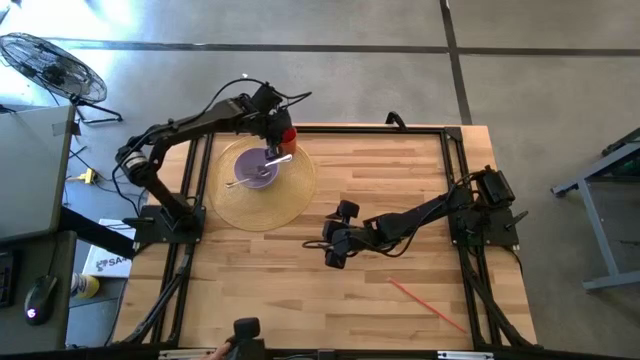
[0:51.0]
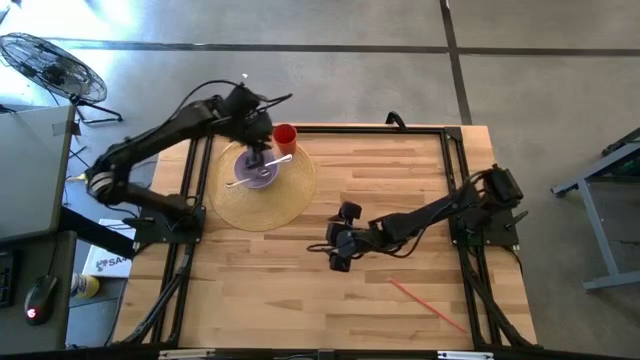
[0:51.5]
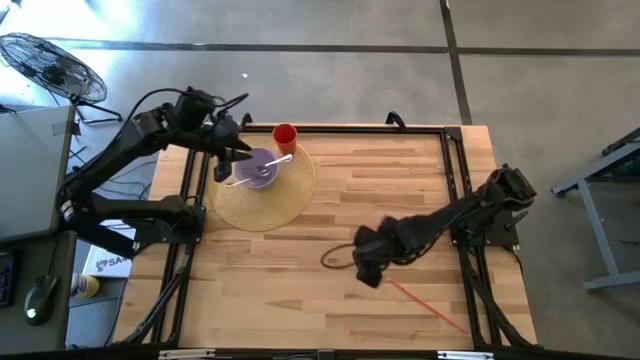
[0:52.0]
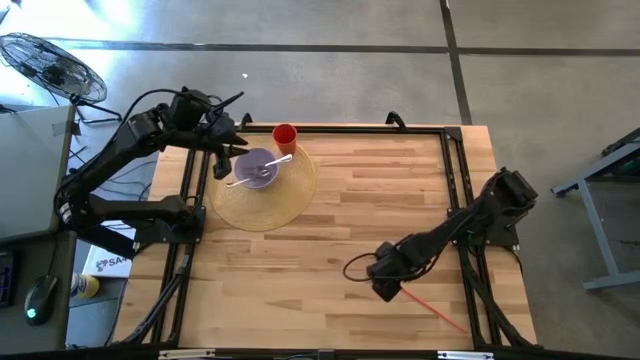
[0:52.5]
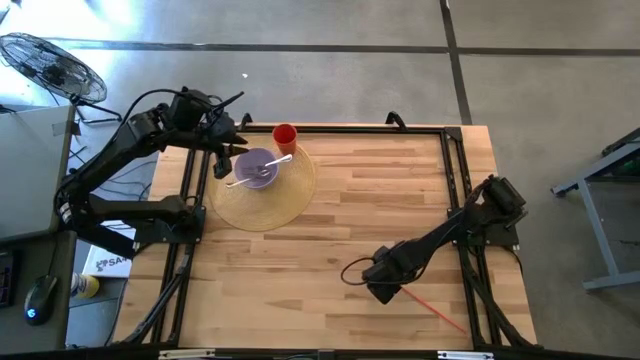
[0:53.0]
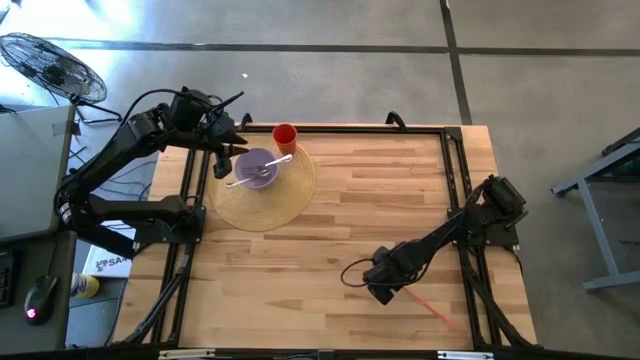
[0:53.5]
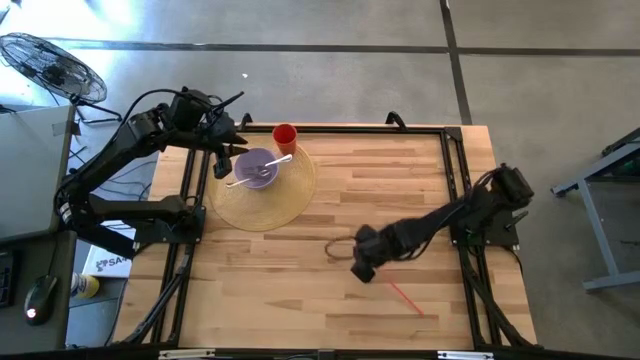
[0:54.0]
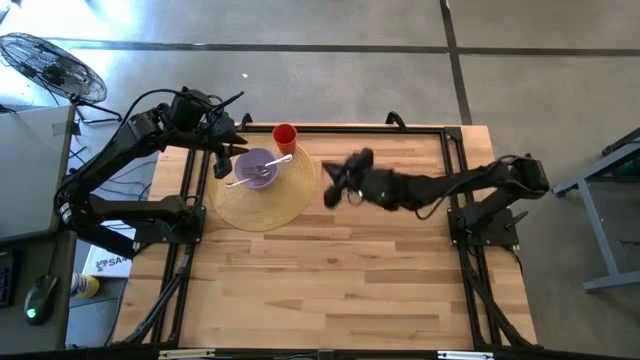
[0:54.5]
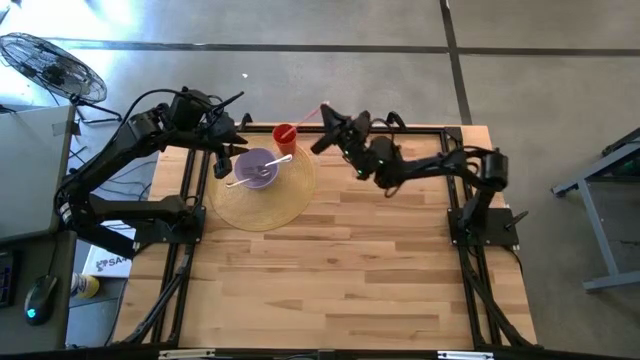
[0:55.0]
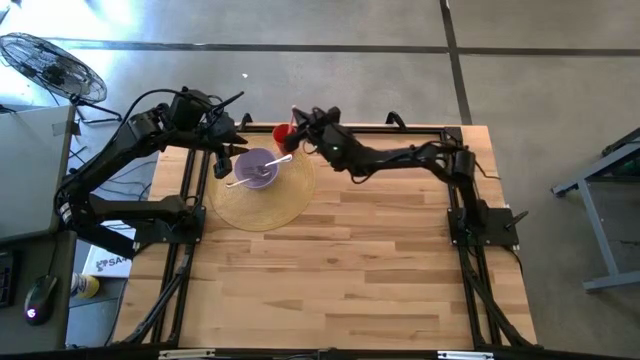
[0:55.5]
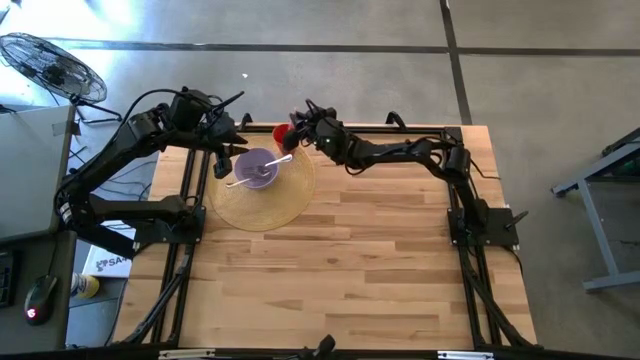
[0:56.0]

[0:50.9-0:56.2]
Task: Pick & Place Utensil
Put the orange straw into the orange cup

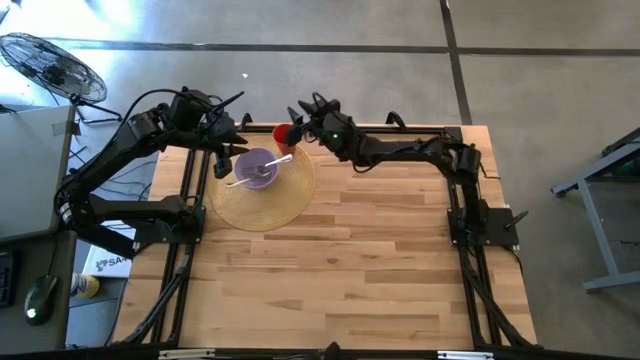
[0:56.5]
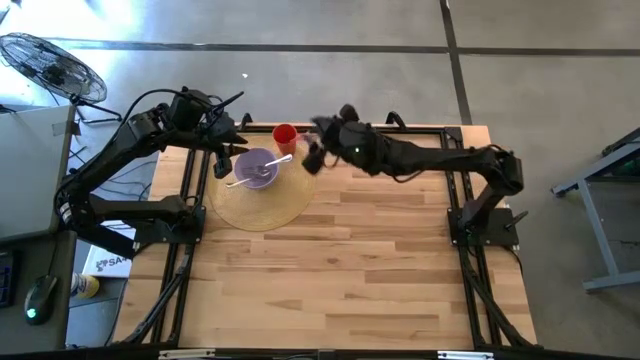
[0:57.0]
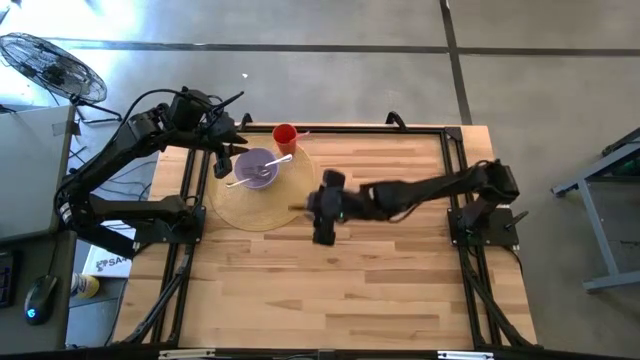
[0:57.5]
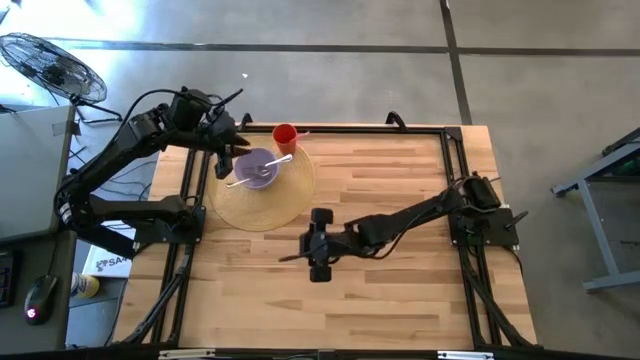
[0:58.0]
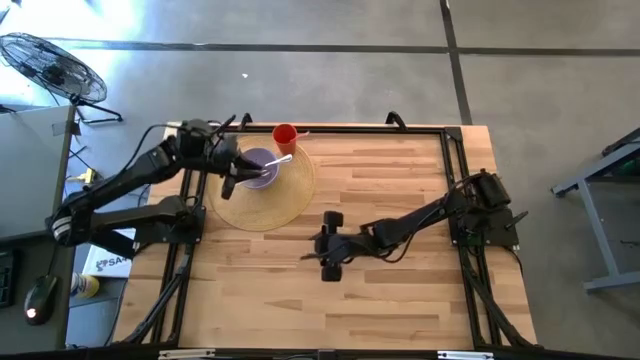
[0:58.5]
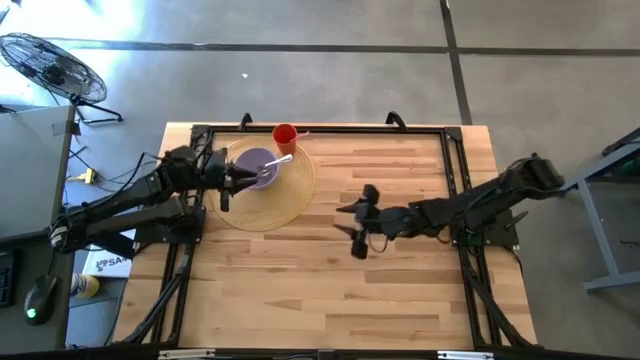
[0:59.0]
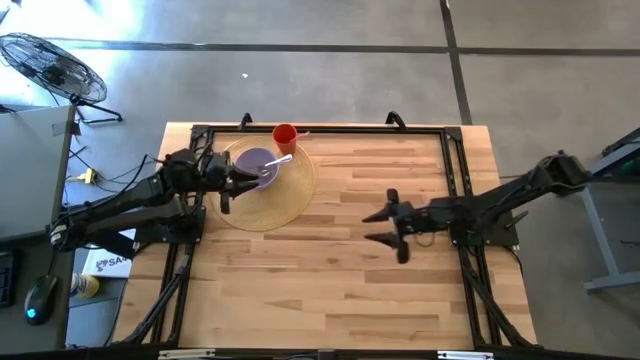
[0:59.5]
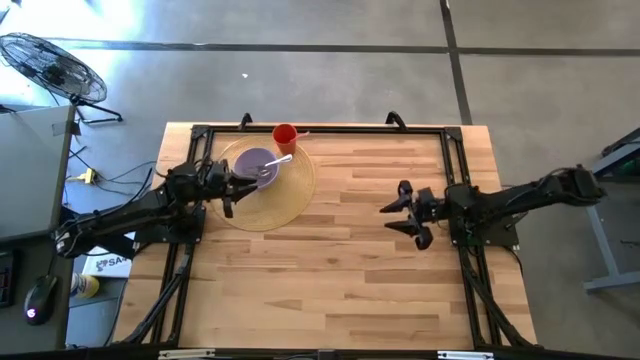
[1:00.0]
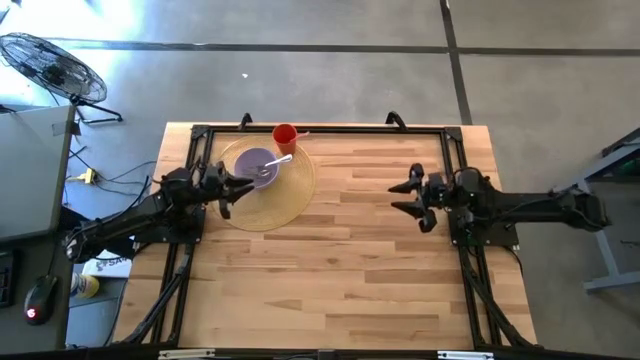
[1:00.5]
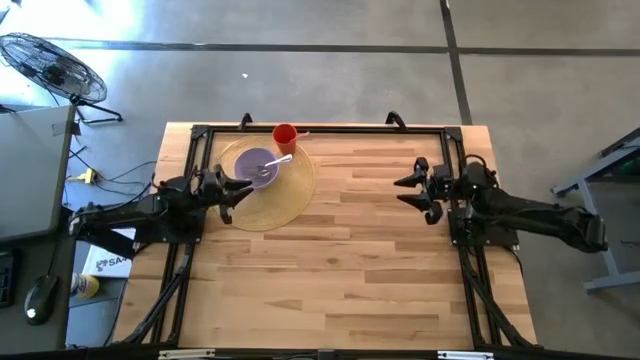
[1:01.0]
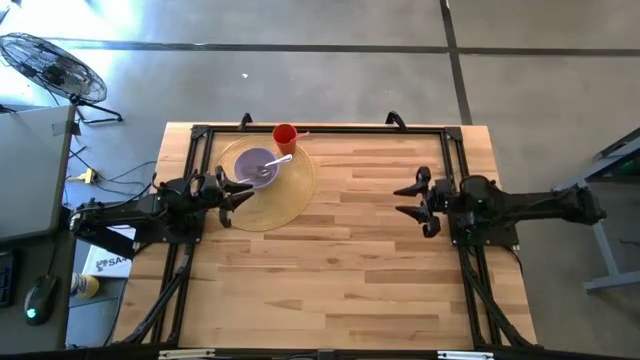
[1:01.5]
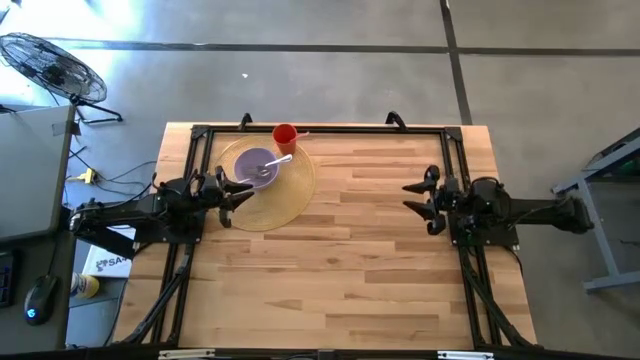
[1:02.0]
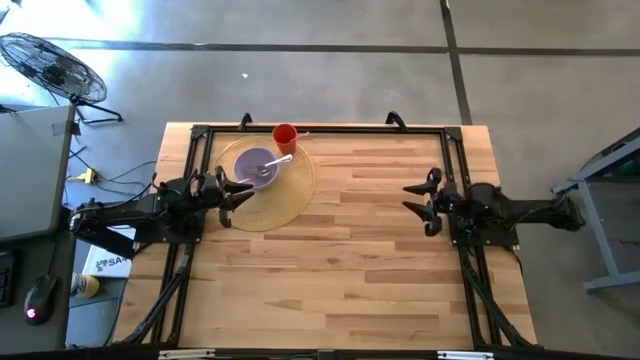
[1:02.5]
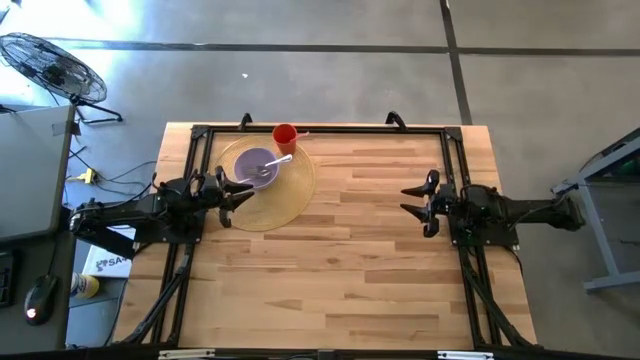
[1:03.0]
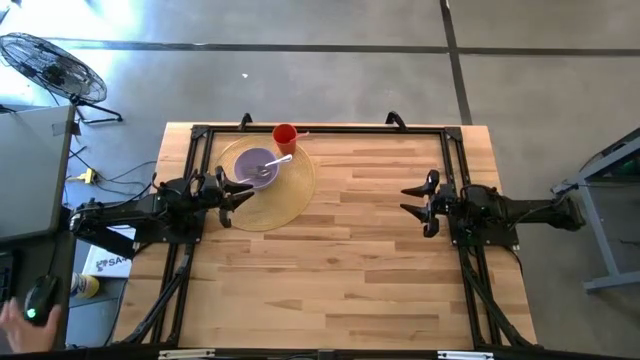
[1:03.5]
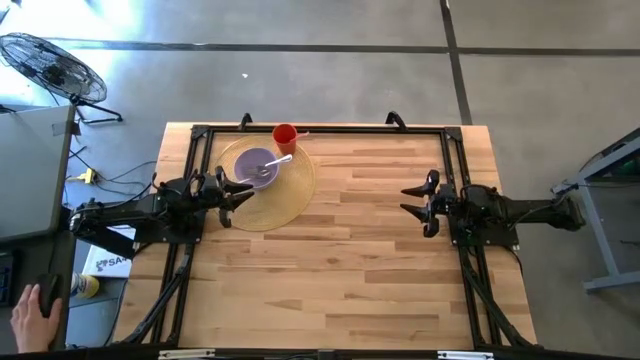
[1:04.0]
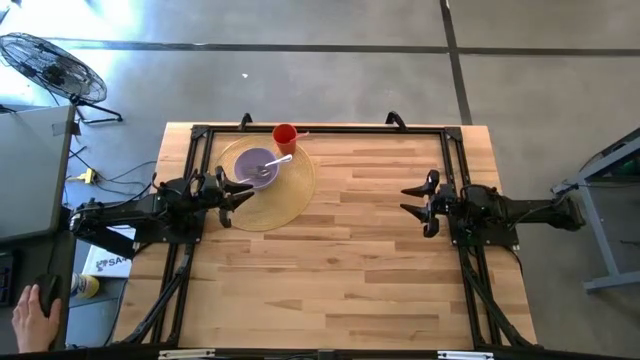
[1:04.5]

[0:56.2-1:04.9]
Return to Home Position

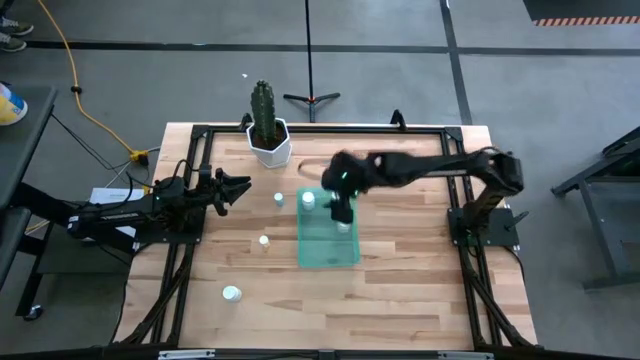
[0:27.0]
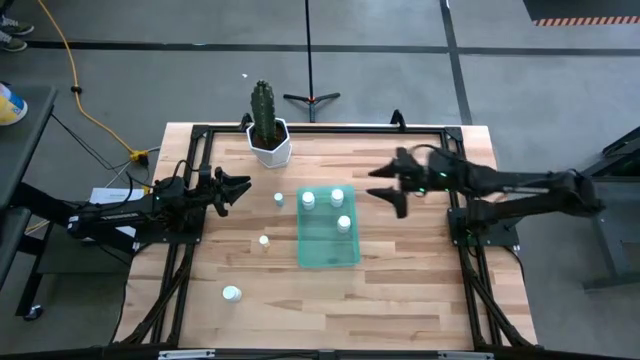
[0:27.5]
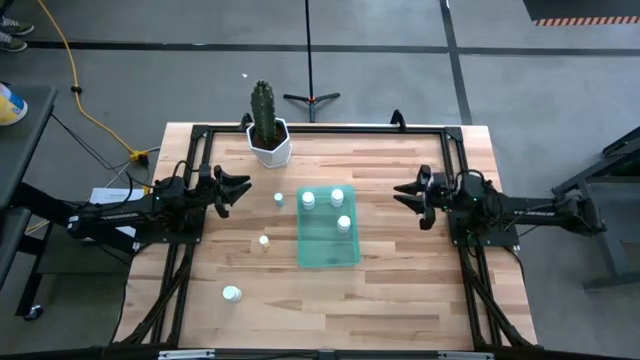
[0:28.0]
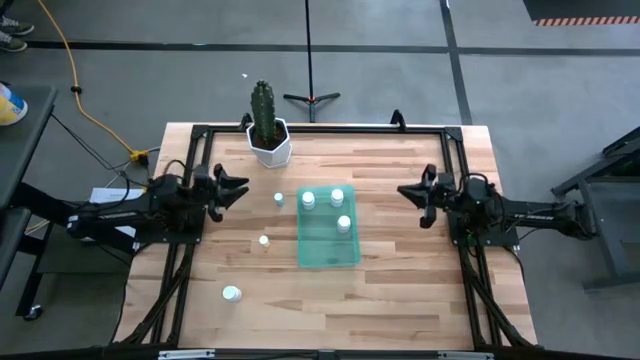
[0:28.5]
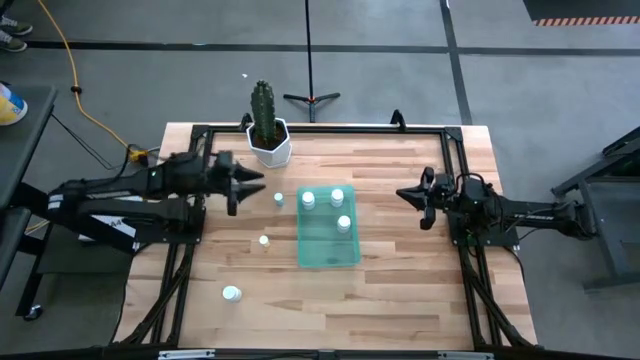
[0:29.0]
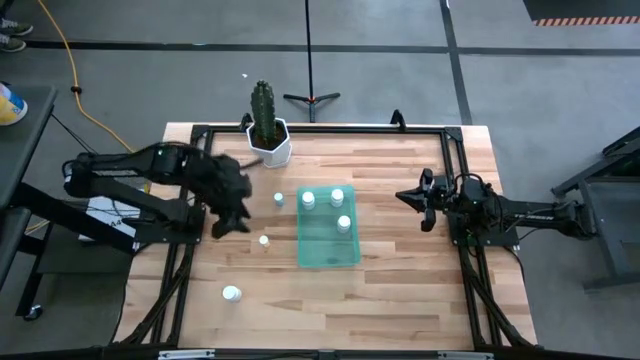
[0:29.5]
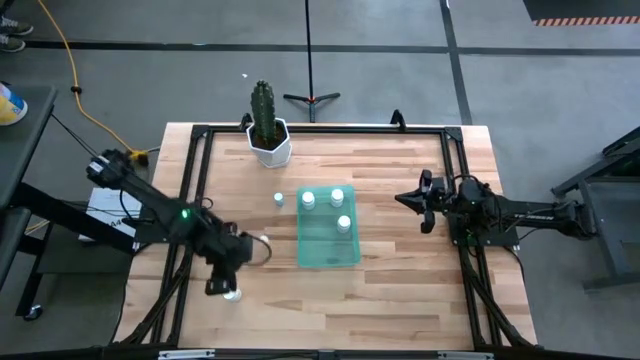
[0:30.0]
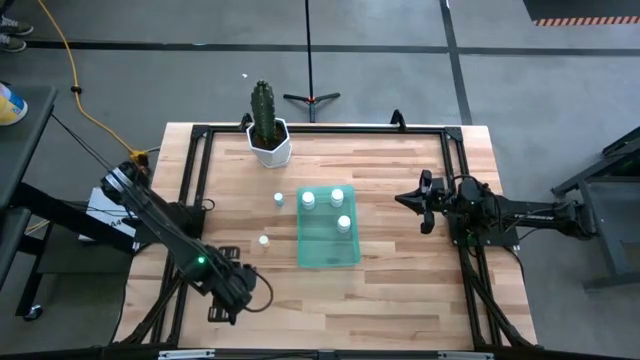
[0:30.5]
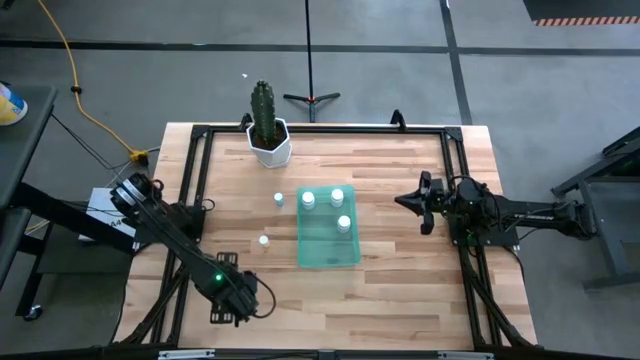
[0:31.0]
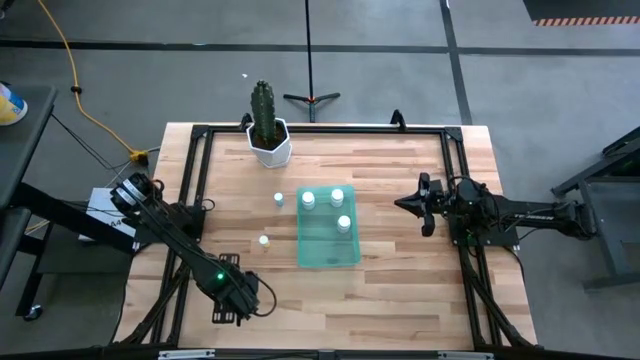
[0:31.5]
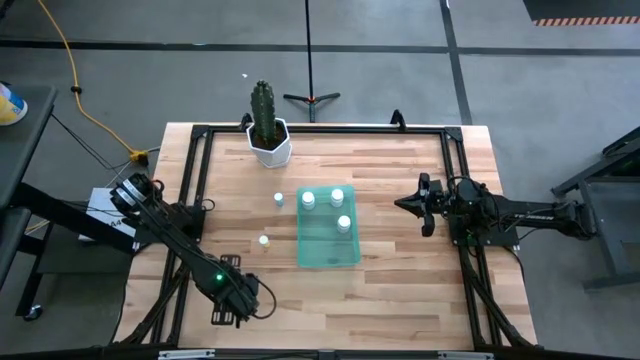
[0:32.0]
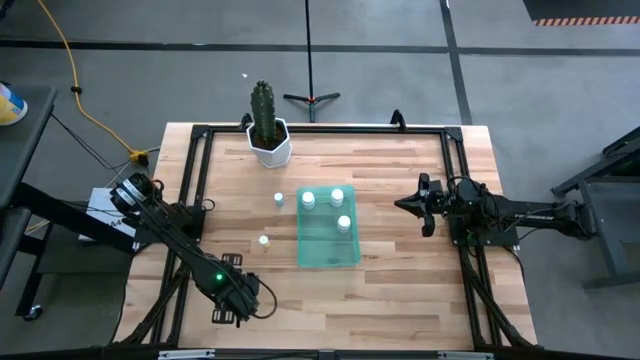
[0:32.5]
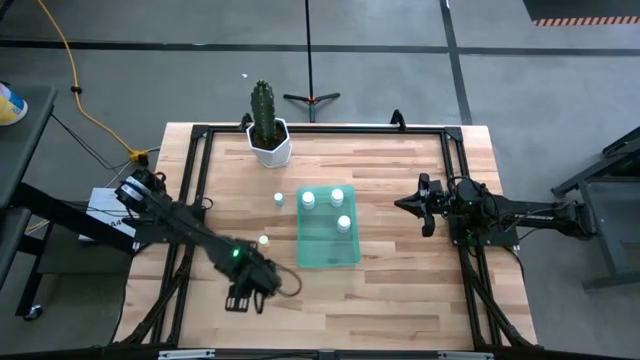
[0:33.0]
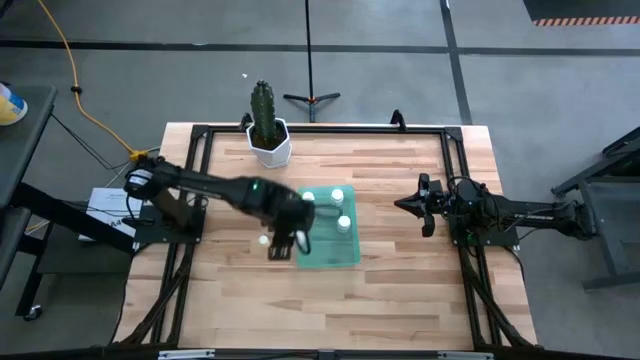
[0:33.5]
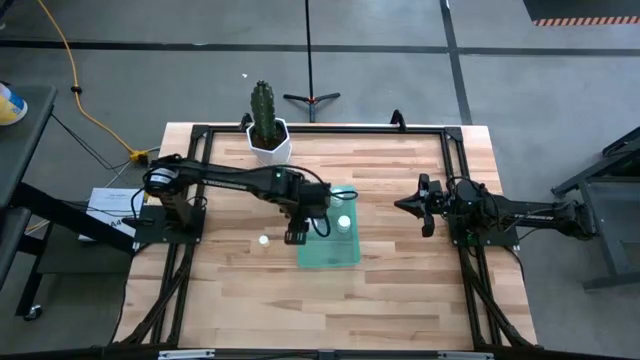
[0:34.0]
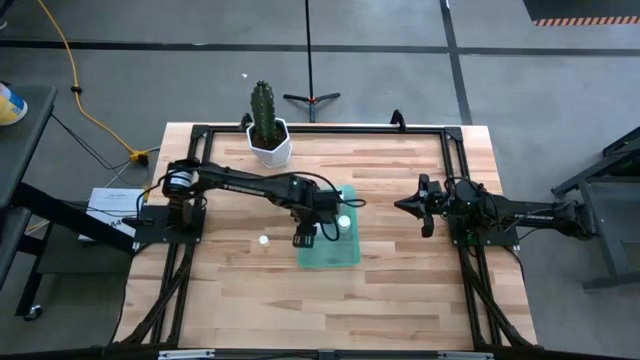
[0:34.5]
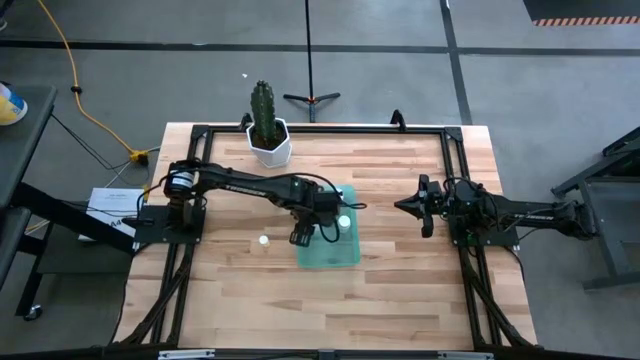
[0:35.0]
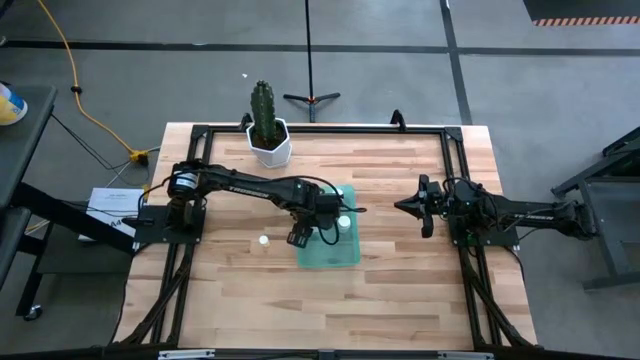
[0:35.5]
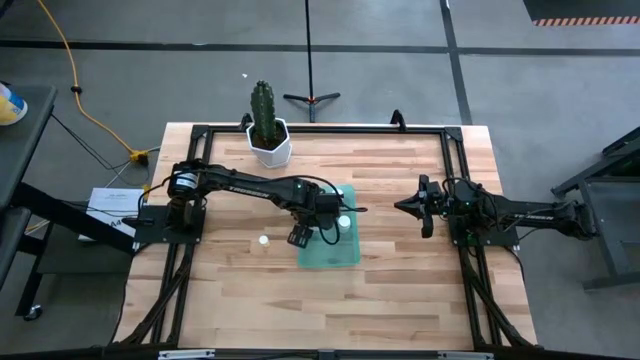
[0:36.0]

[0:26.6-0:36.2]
Task: Pick and place pill bottles into a basket
Put the white pill bottle into the green bin
